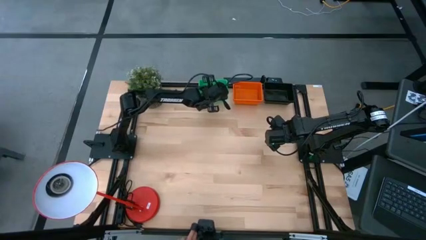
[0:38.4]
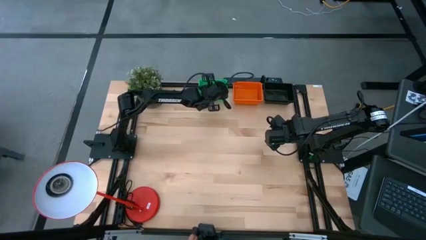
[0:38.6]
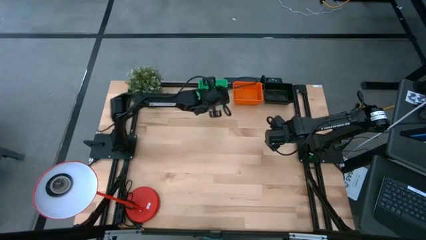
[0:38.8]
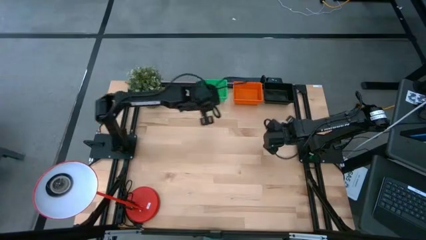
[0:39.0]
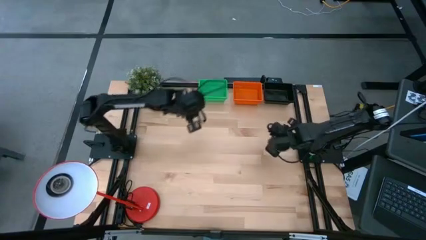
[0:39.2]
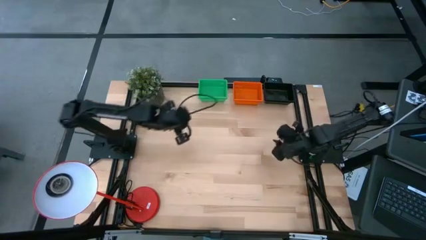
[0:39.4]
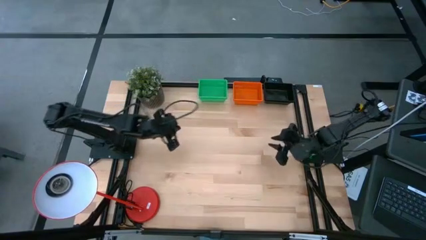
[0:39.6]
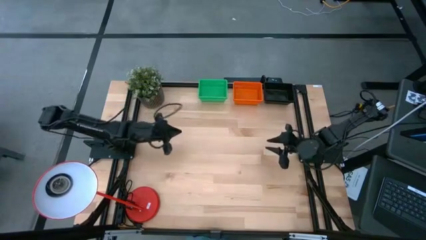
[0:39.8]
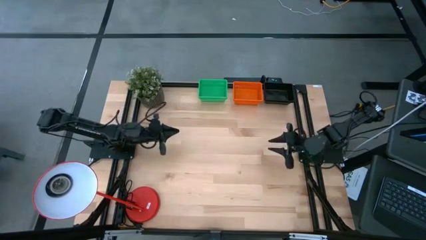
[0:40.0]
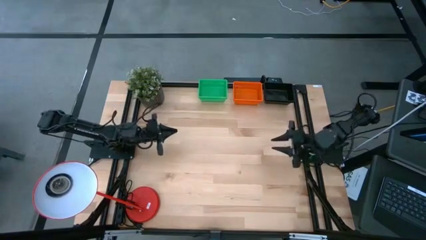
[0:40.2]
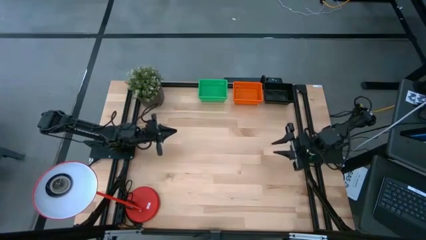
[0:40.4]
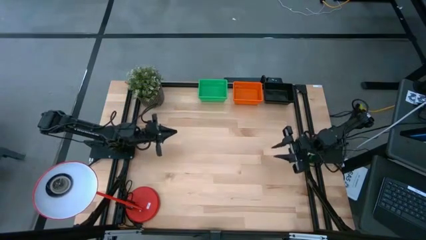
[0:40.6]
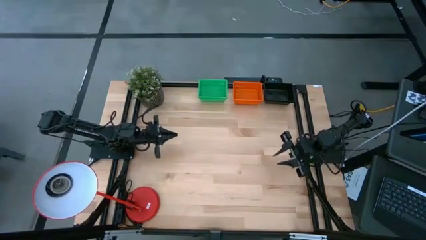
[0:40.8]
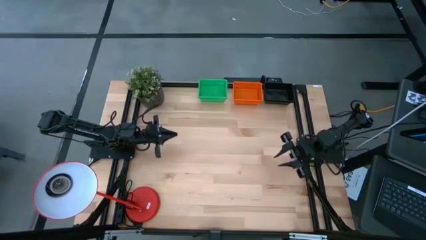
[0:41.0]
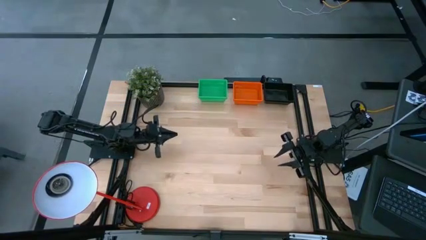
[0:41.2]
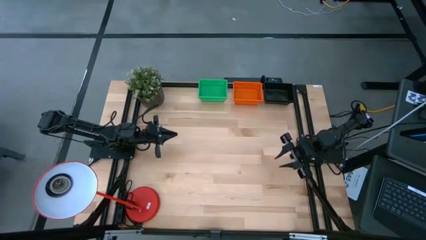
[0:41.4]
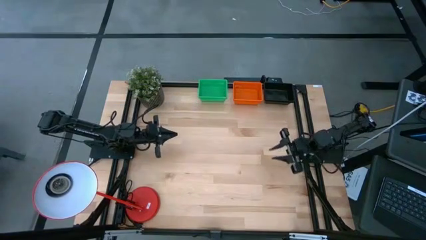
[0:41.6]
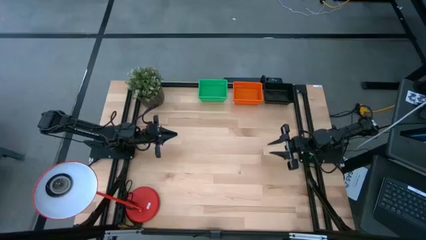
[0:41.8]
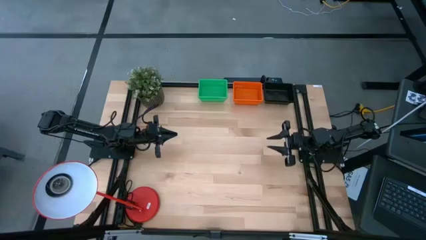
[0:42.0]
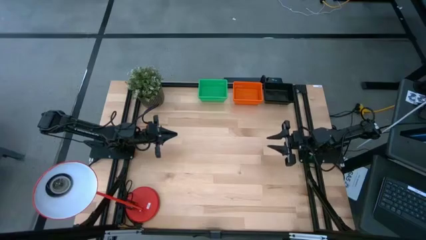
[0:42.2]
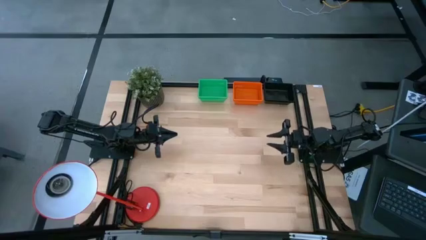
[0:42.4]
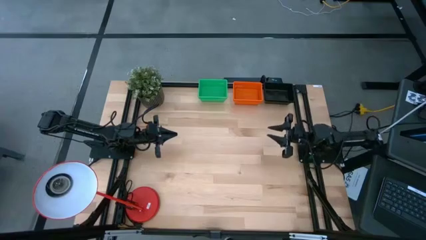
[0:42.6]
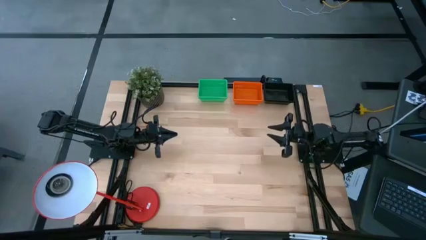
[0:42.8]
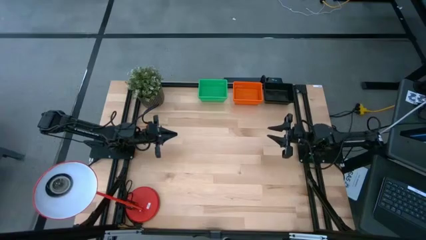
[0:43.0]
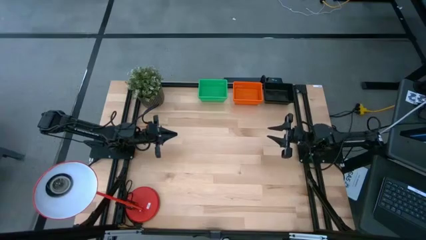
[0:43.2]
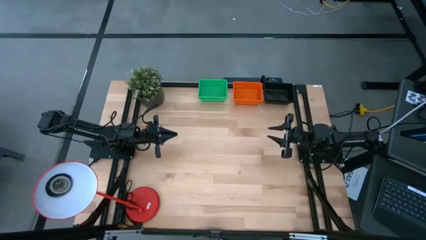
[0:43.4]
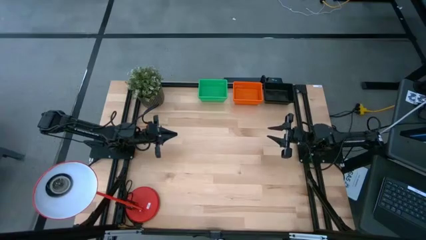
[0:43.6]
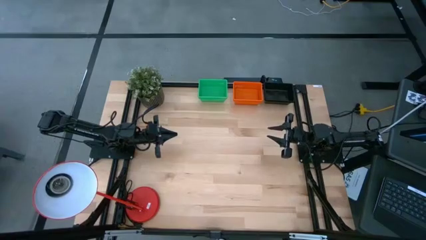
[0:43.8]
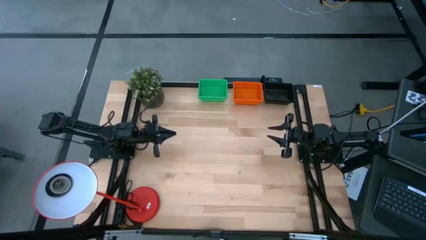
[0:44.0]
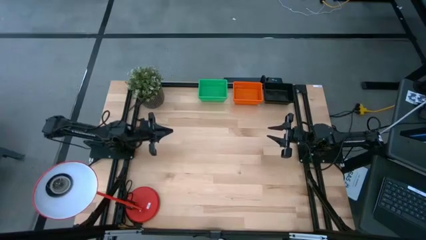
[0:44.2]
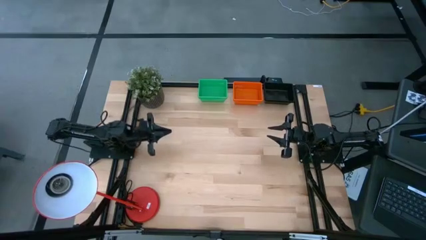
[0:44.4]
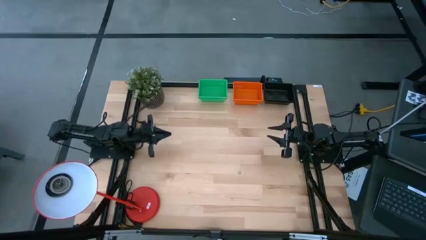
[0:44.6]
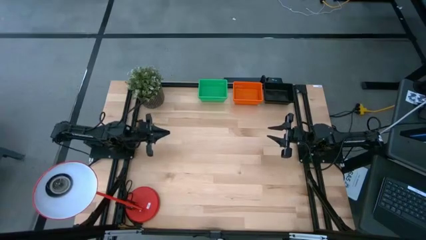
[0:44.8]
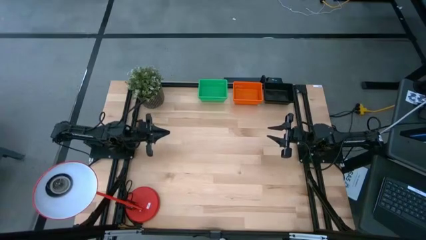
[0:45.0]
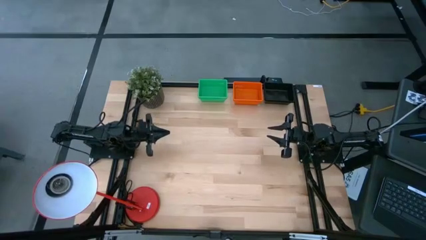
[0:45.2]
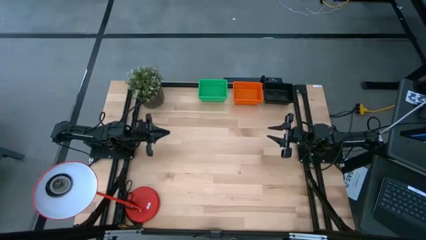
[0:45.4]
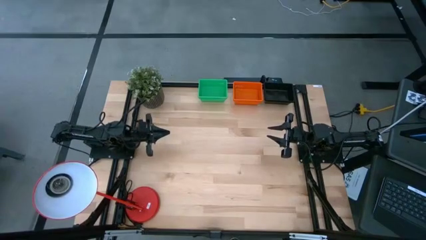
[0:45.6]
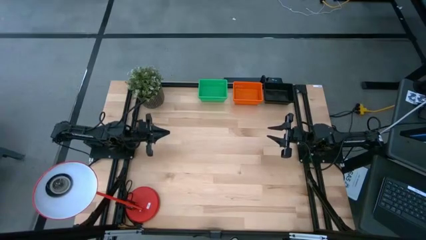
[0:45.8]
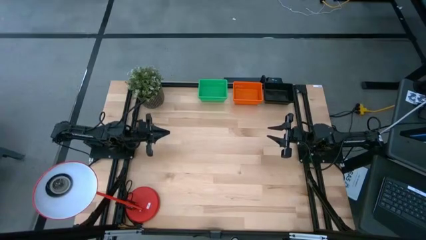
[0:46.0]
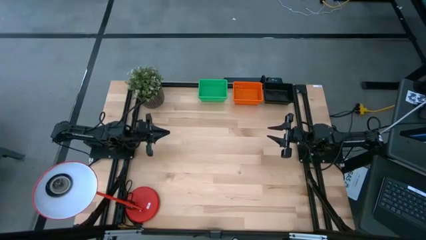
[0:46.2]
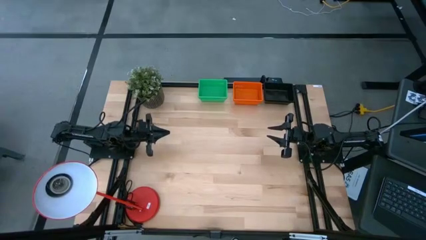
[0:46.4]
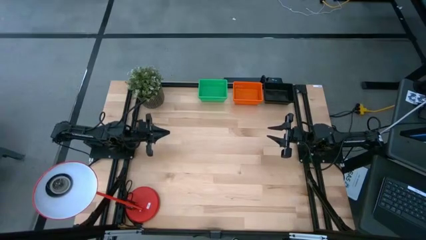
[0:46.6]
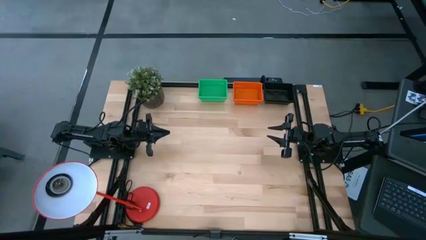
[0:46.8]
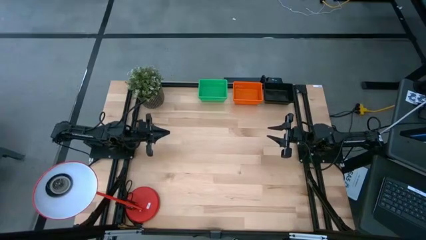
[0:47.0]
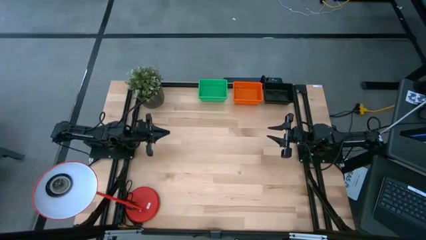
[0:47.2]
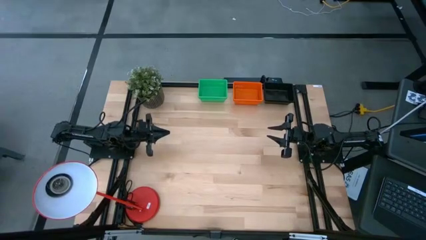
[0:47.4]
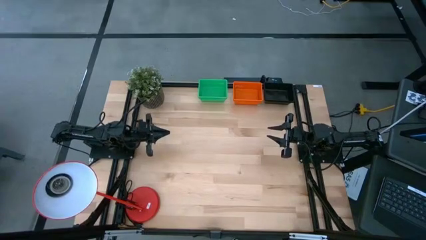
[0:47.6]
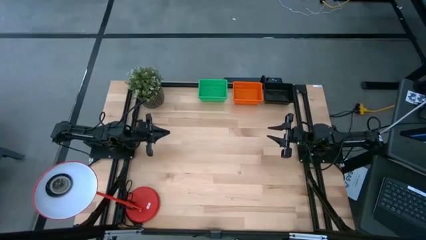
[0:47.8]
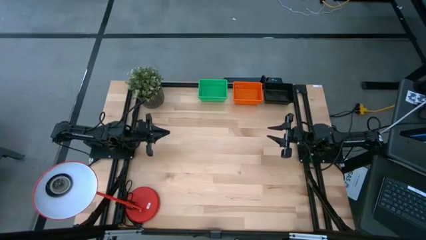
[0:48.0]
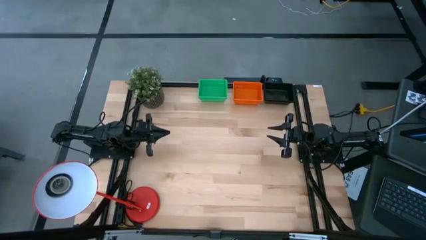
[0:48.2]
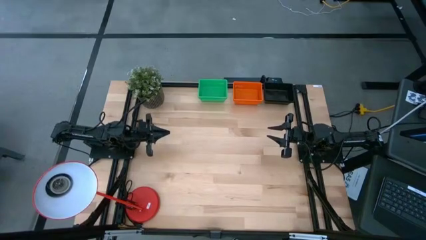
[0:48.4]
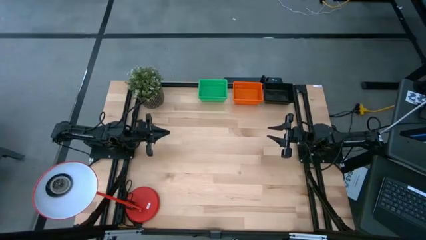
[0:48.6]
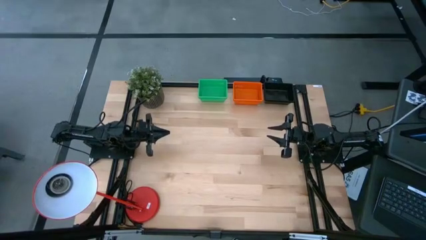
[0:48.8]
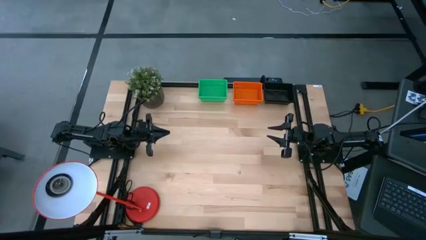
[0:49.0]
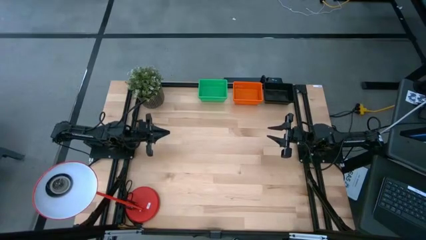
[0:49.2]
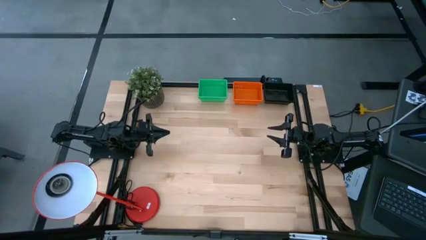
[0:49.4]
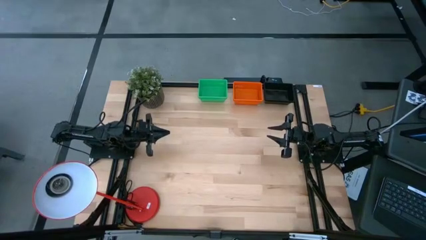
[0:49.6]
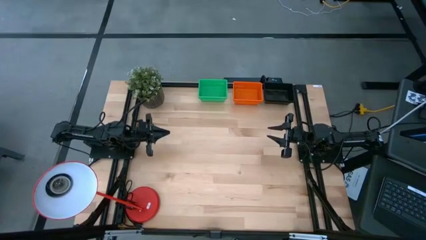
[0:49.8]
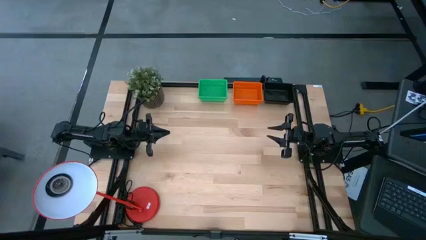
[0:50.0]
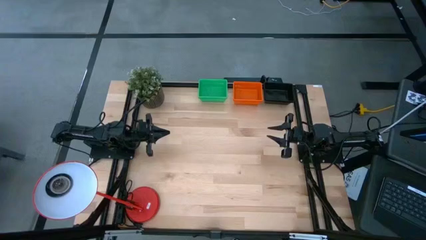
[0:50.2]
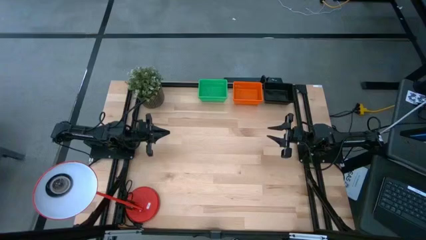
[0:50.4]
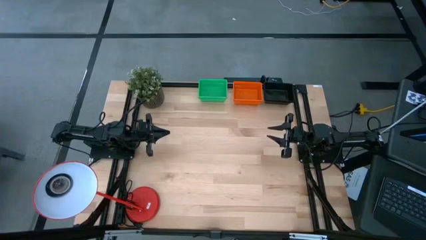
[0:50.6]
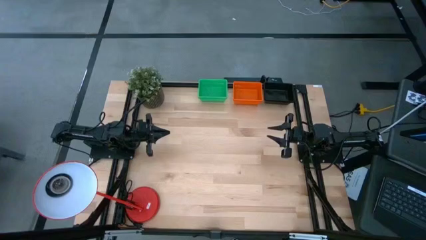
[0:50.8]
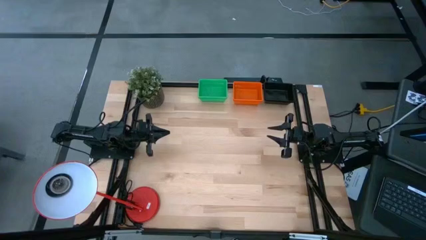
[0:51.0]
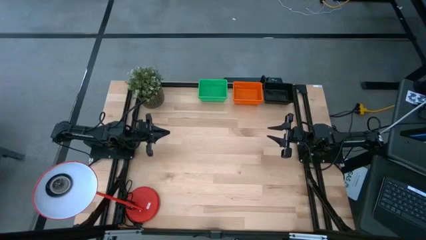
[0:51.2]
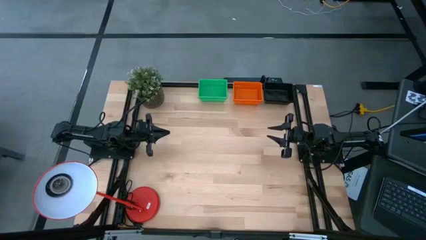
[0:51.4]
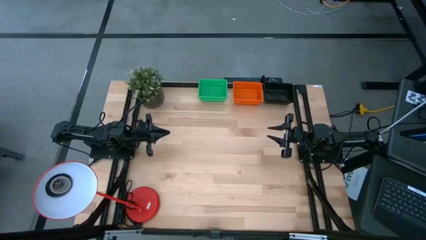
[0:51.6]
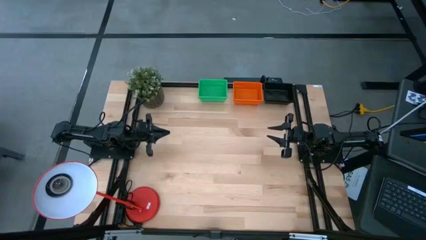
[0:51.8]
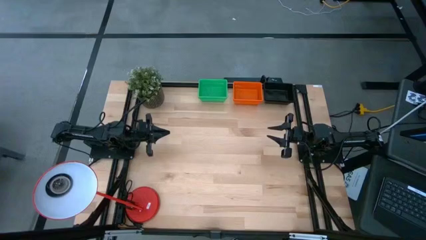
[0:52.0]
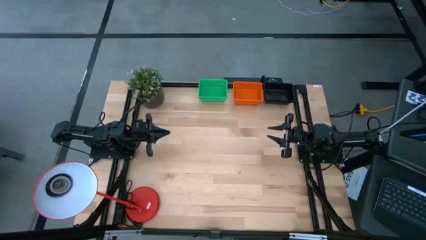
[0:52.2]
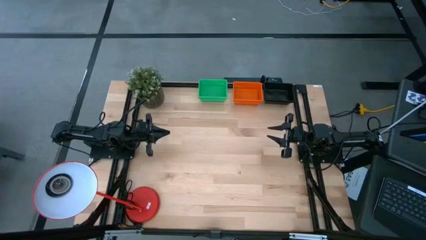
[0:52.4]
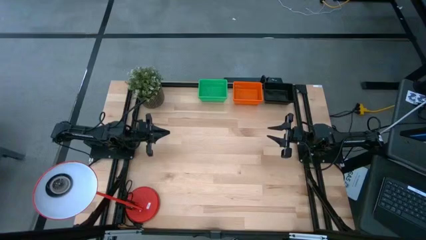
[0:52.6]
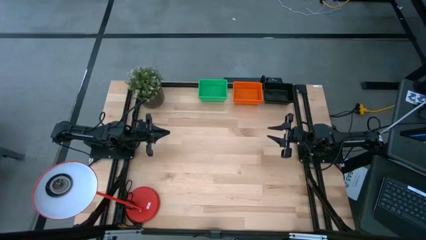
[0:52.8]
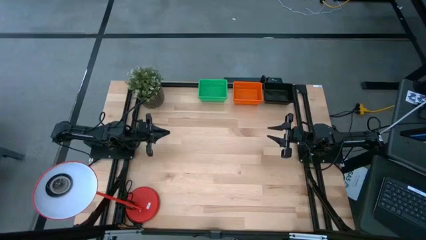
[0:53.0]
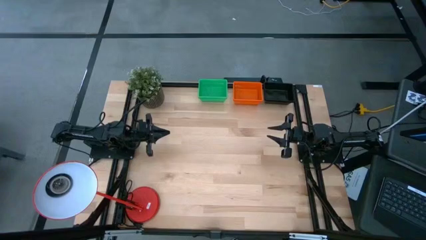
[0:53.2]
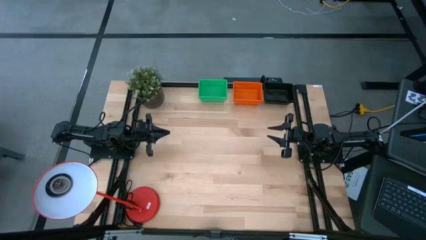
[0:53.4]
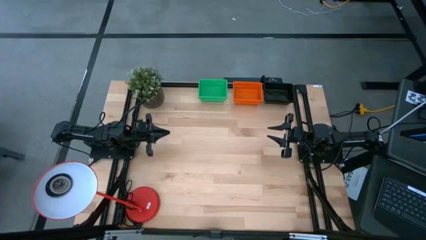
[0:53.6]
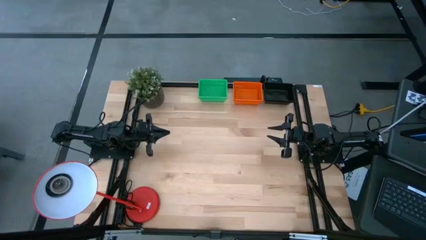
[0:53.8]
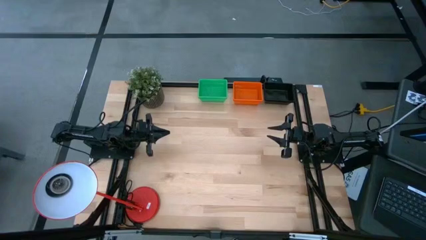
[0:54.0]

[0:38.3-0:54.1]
Return to Home Position
